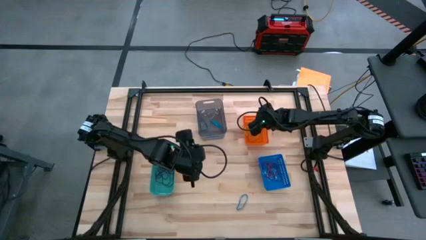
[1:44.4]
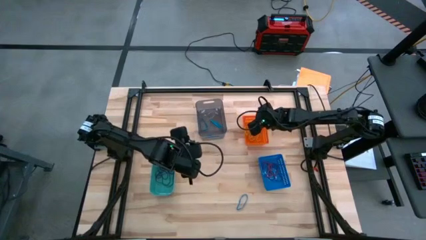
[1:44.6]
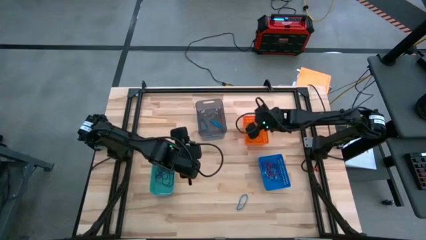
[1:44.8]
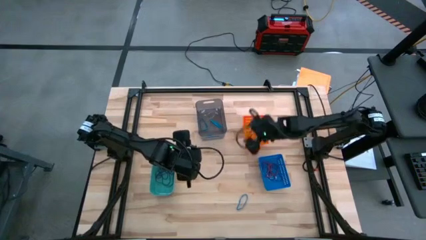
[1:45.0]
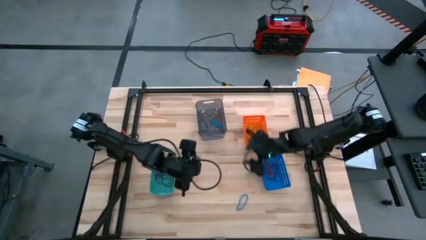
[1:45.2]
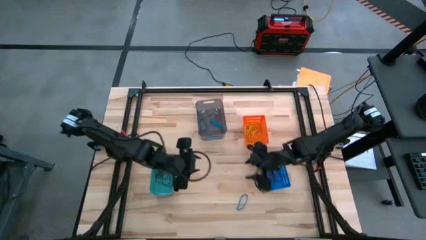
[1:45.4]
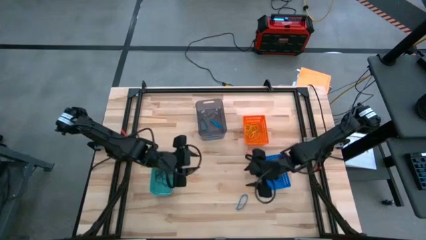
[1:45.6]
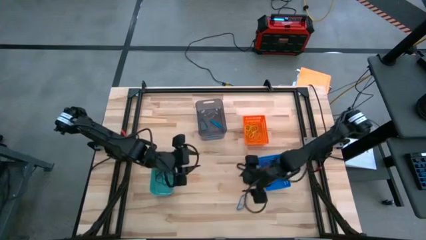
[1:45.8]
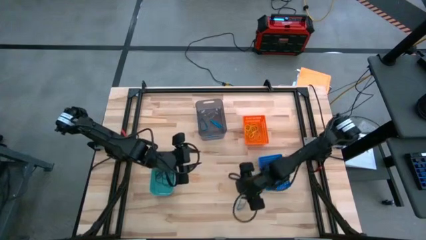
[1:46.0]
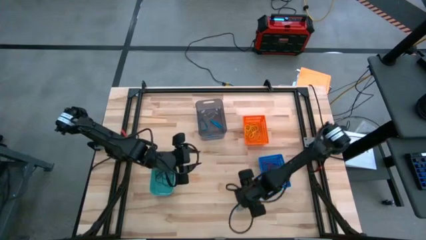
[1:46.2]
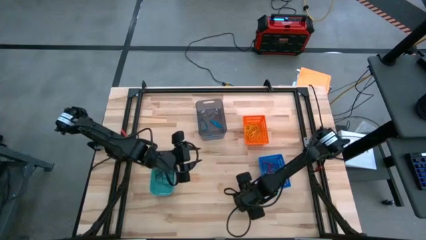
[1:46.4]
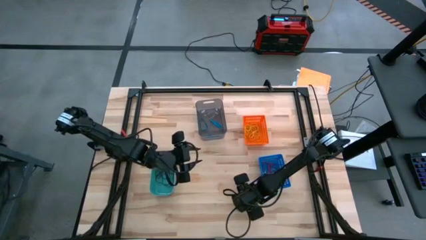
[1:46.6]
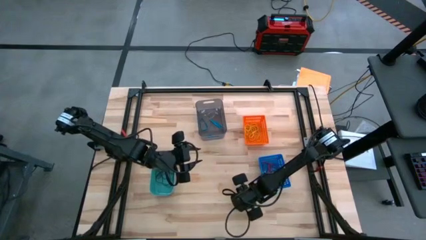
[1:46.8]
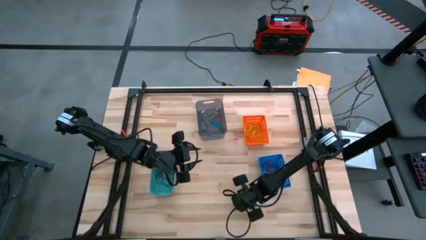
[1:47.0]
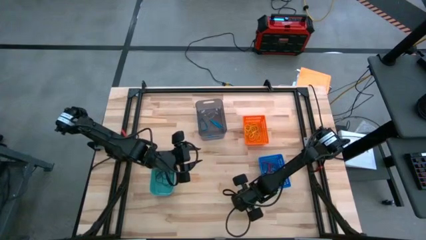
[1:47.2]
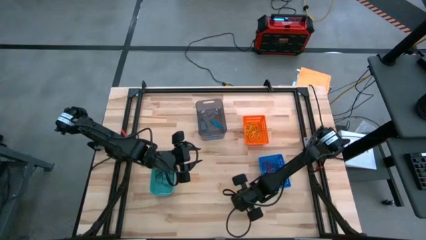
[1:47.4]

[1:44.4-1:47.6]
Task: Sort rubber bands into baskets
Put the blue rubber band into the black bin

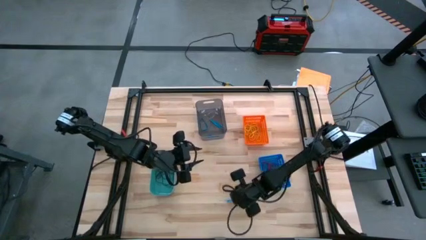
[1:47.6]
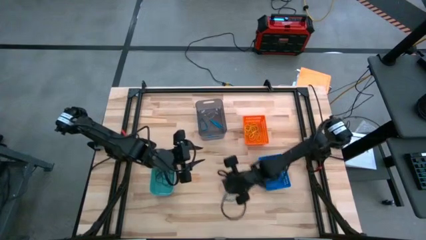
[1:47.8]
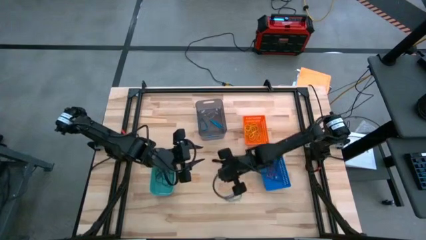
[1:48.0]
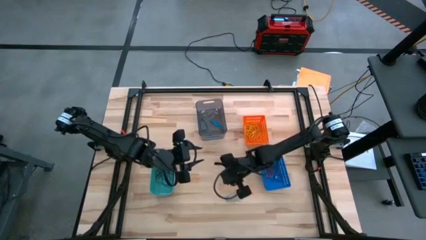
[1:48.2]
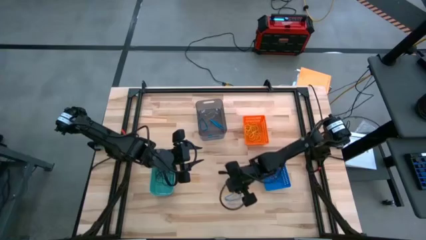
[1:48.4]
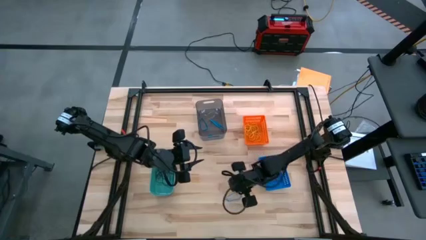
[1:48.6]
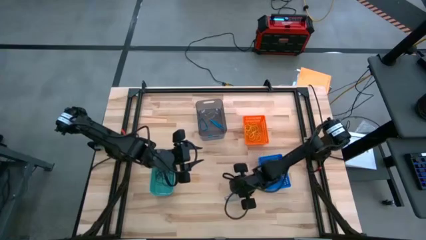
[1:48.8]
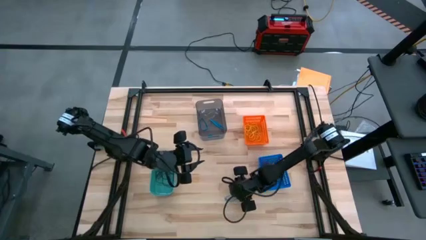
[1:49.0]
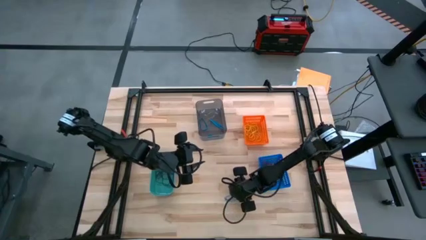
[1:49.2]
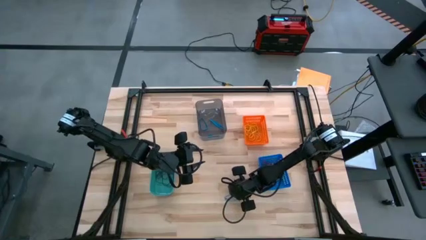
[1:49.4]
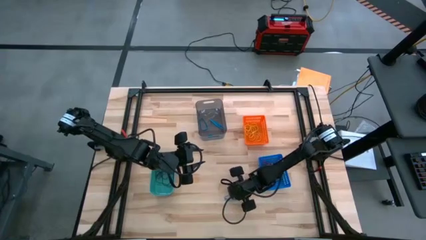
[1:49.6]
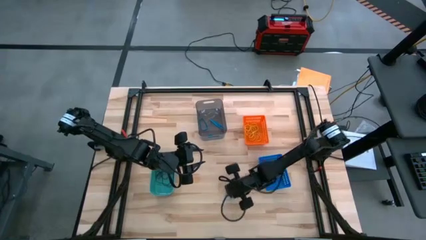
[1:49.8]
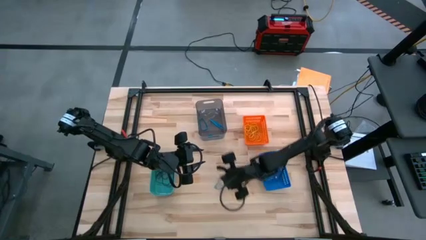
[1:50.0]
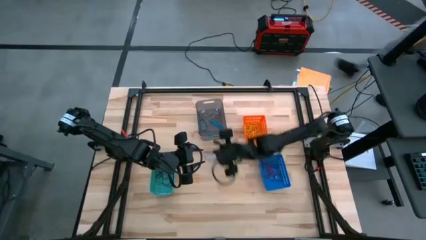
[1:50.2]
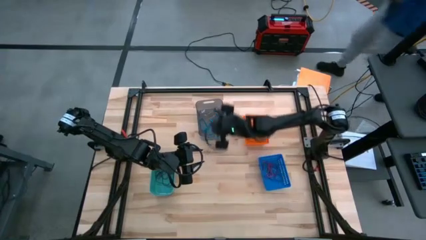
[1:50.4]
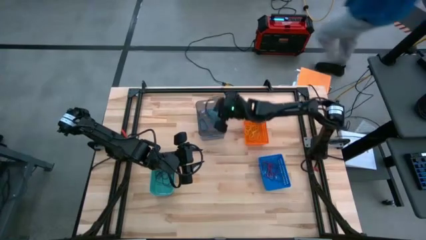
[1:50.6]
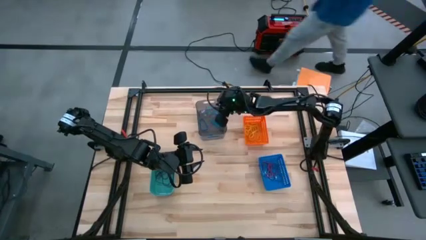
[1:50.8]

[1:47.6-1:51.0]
Put the blue rubber band into the black bin

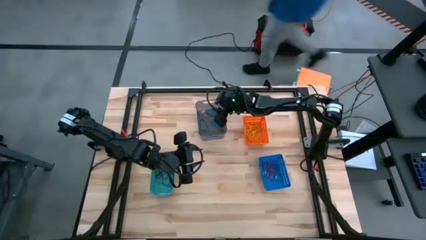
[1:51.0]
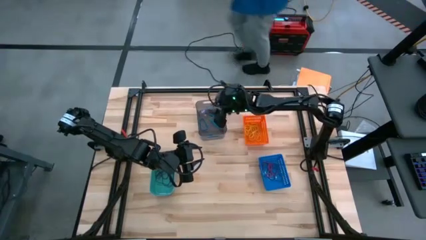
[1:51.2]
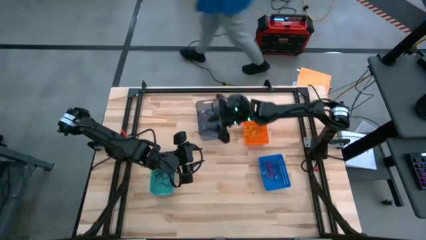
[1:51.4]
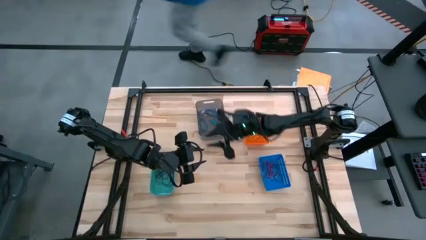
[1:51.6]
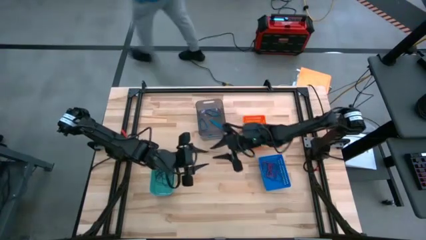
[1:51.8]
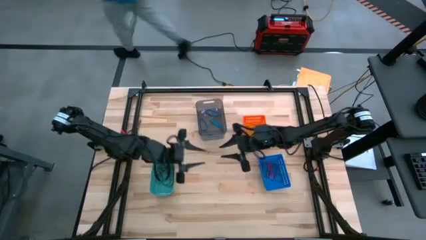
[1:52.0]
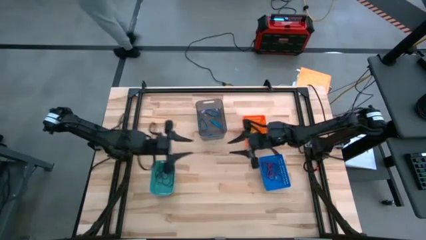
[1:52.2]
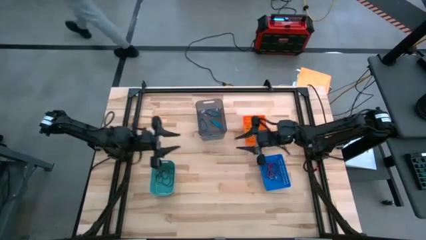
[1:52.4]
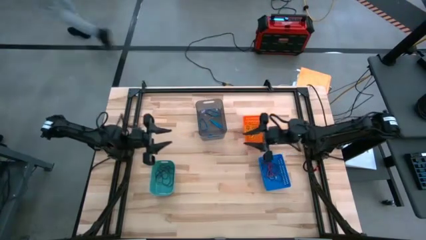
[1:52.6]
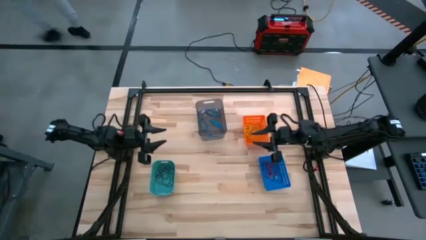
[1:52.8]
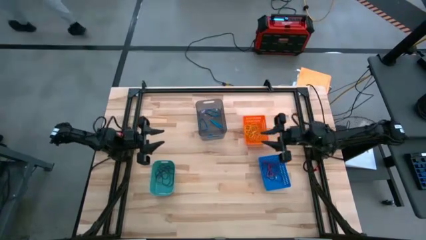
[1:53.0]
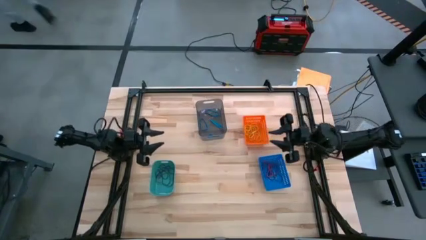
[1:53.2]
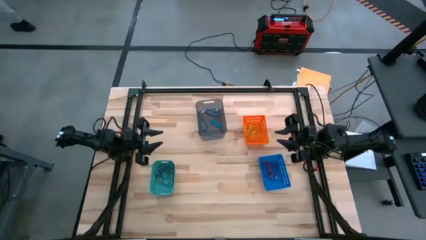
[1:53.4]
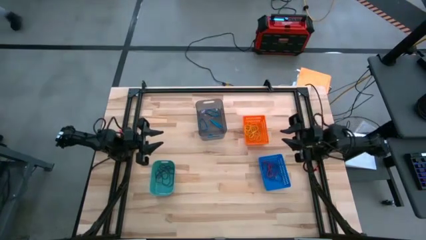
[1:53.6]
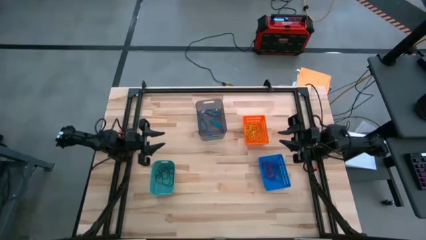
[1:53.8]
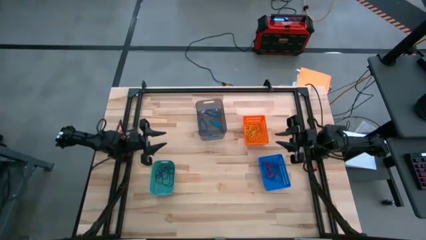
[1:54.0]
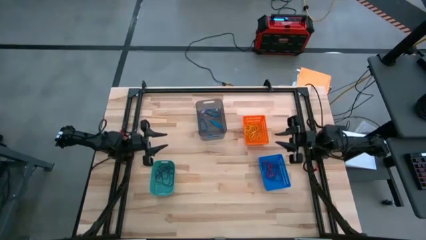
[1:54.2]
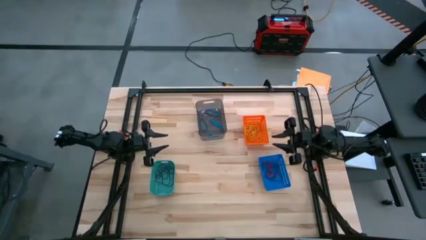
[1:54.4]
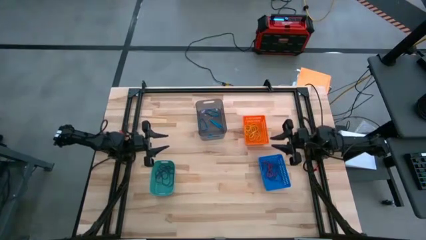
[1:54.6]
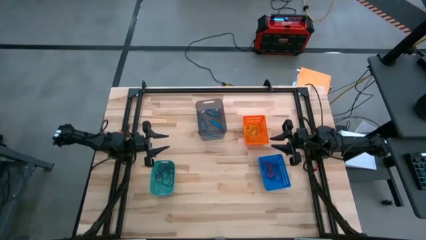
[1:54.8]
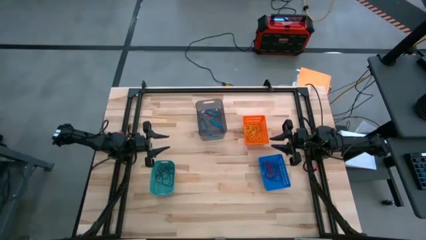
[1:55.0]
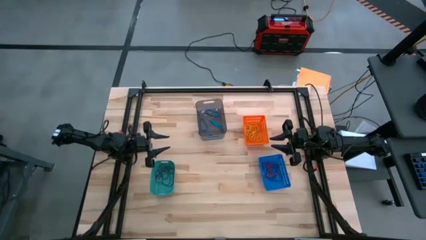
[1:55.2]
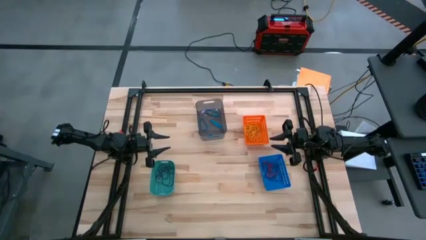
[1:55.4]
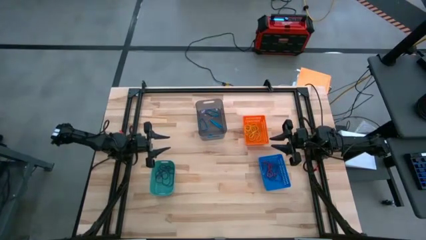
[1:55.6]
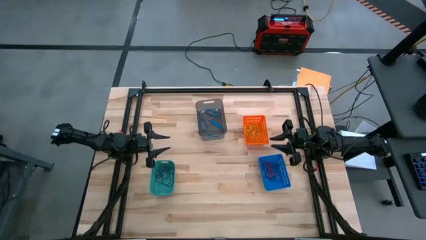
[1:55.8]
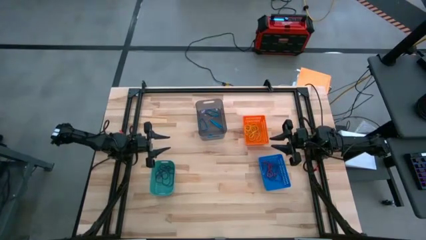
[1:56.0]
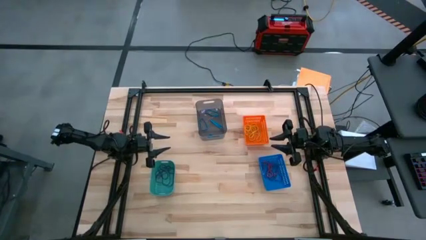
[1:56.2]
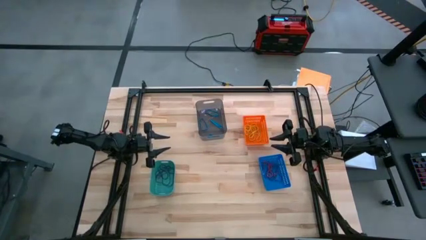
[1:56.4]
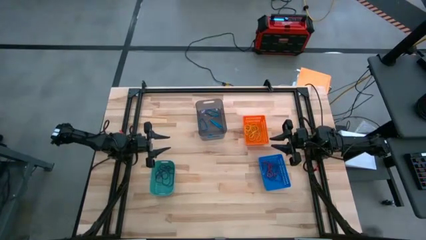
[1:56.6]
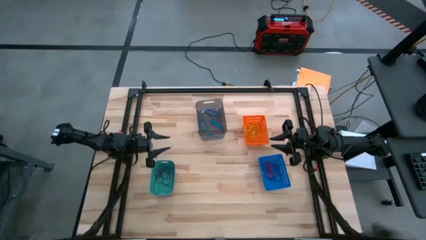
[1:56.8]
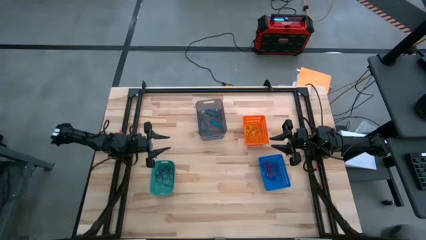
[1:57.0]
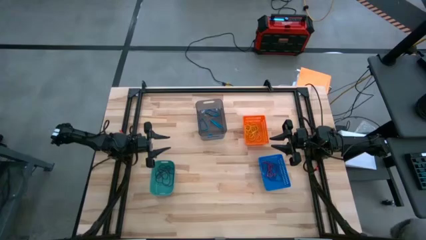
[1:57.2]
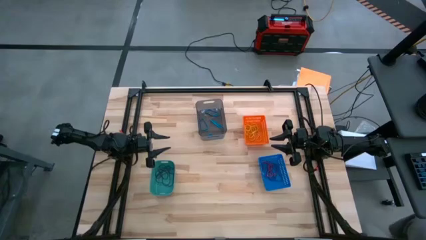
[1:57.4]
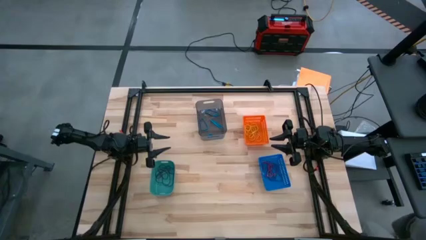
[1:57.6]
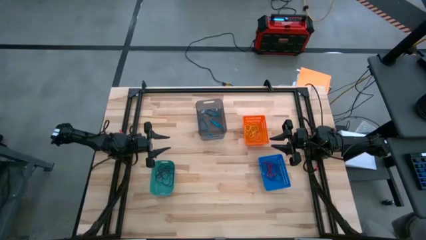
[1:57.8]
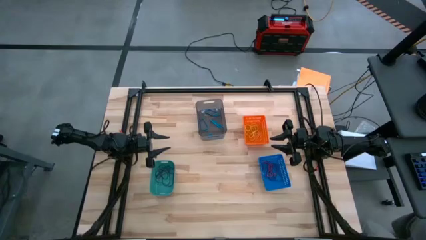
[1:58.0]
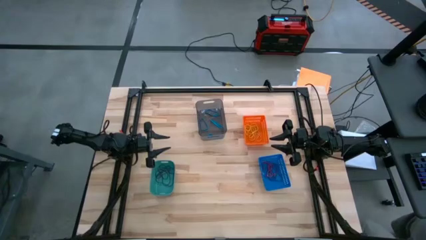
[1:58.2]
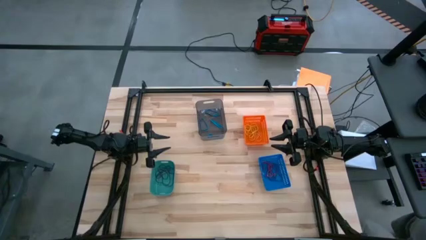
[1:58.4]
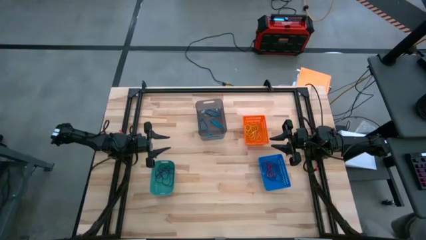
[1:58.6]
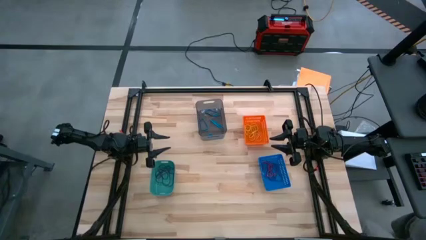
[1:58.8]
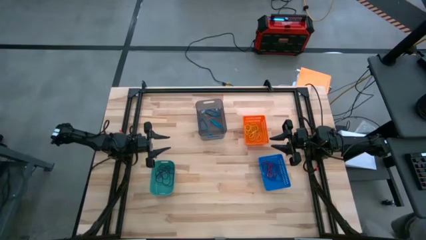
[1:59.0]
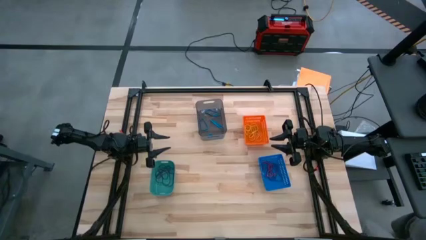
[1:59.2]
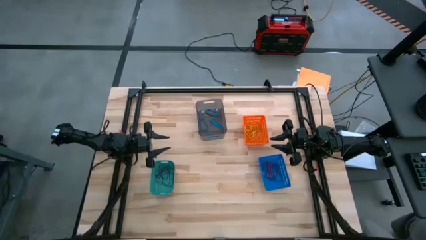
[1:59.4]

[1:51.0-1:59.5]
Return to Home Position
